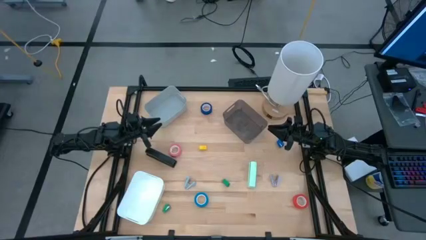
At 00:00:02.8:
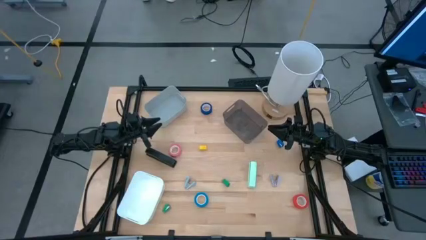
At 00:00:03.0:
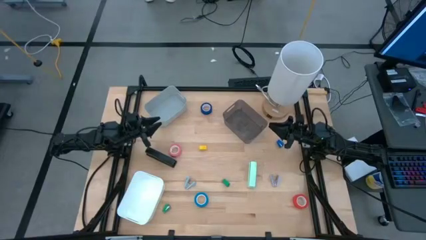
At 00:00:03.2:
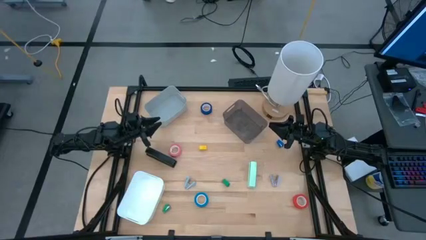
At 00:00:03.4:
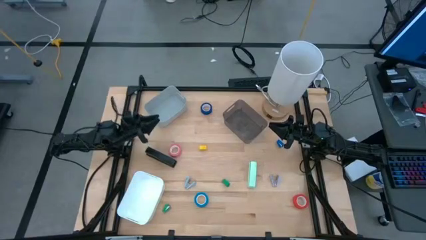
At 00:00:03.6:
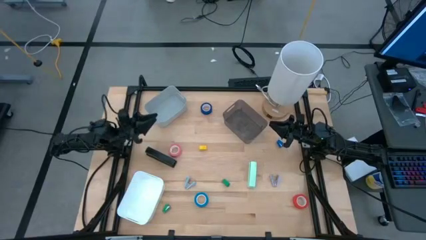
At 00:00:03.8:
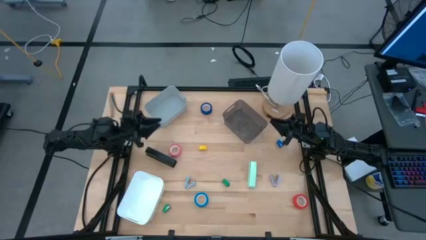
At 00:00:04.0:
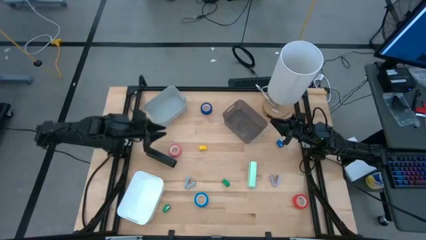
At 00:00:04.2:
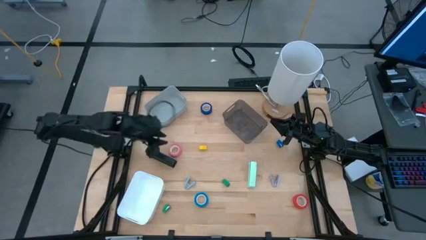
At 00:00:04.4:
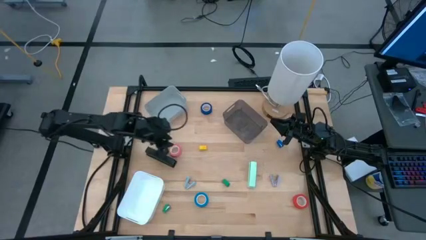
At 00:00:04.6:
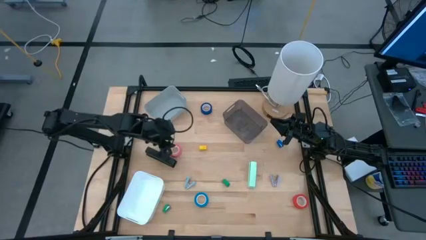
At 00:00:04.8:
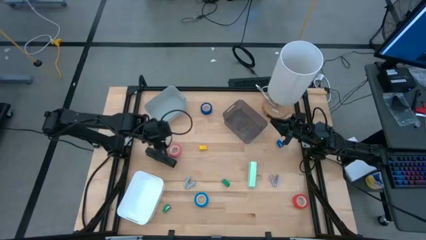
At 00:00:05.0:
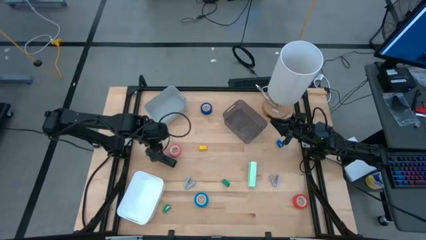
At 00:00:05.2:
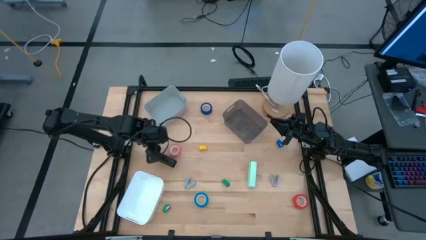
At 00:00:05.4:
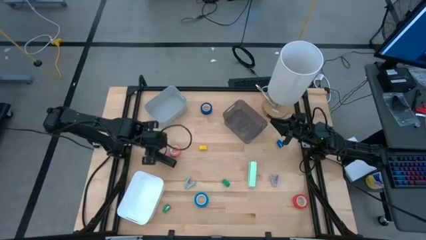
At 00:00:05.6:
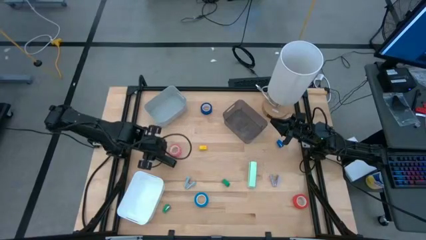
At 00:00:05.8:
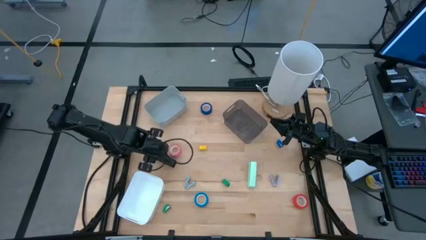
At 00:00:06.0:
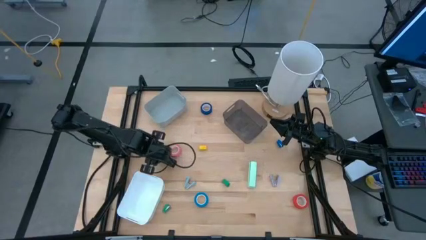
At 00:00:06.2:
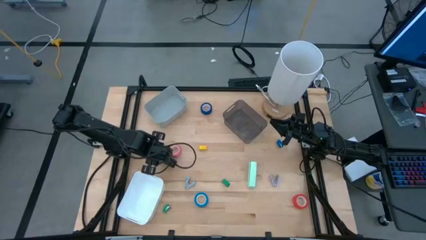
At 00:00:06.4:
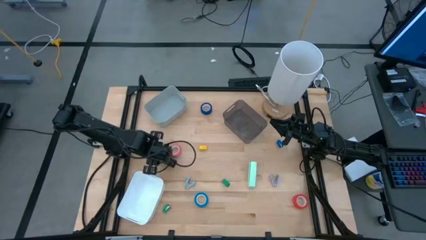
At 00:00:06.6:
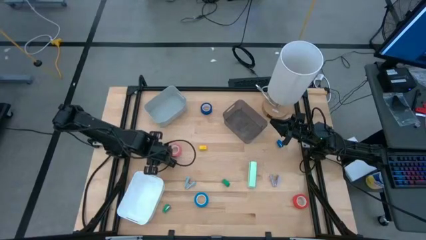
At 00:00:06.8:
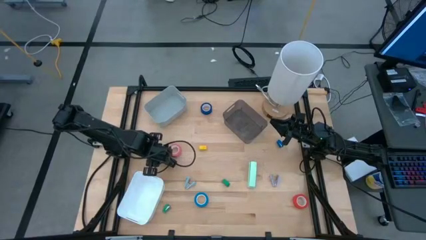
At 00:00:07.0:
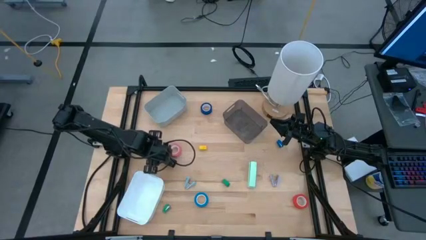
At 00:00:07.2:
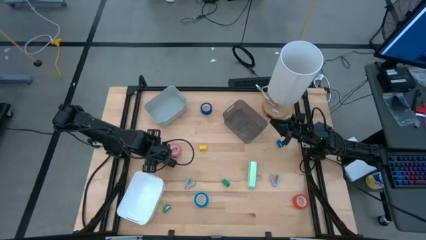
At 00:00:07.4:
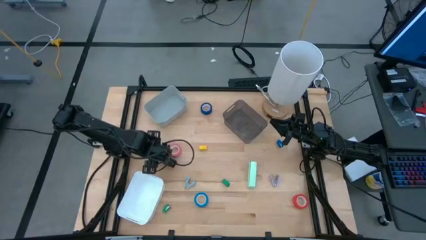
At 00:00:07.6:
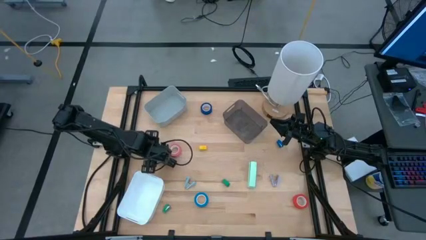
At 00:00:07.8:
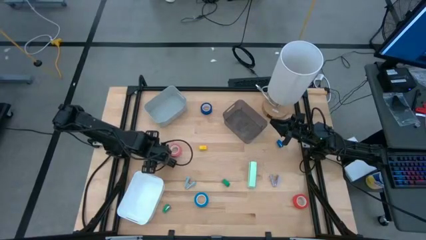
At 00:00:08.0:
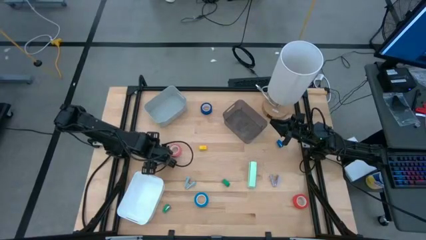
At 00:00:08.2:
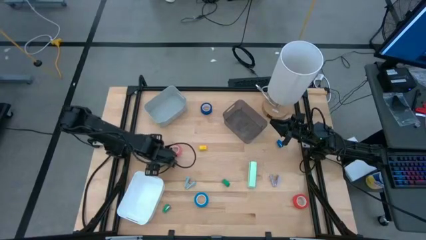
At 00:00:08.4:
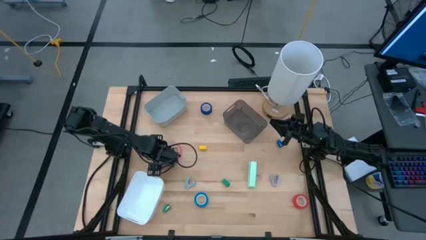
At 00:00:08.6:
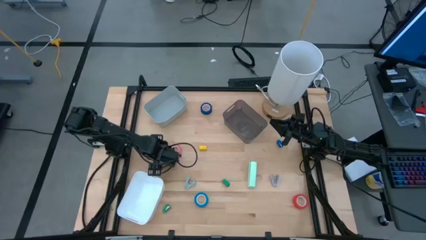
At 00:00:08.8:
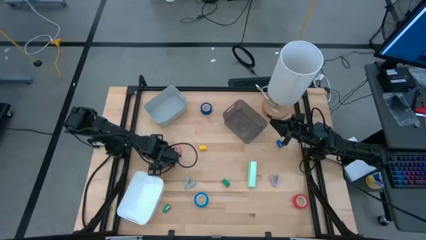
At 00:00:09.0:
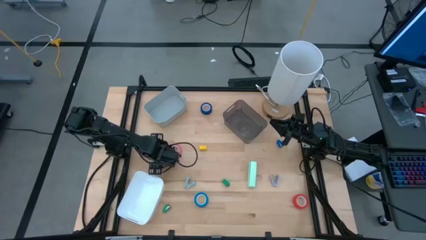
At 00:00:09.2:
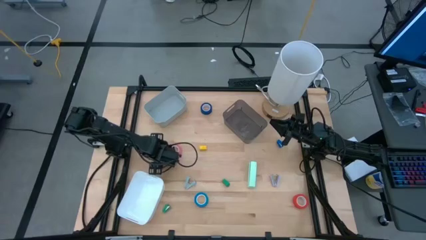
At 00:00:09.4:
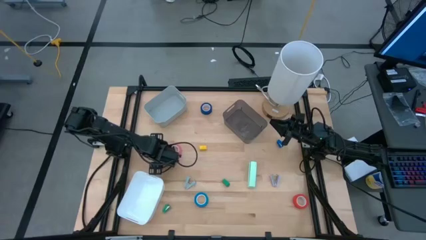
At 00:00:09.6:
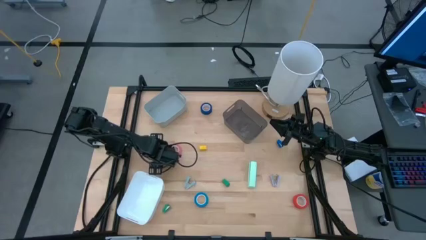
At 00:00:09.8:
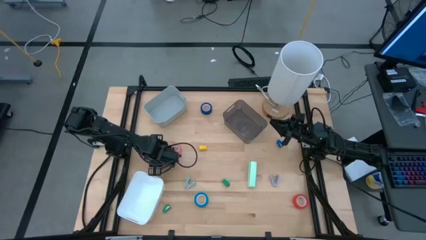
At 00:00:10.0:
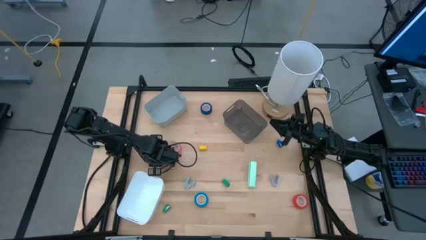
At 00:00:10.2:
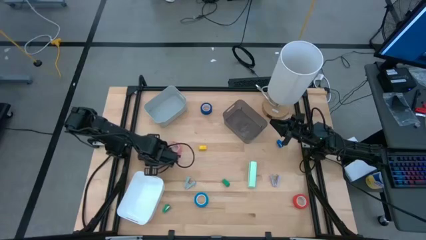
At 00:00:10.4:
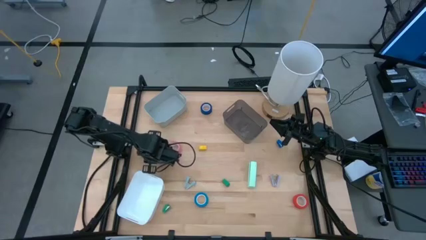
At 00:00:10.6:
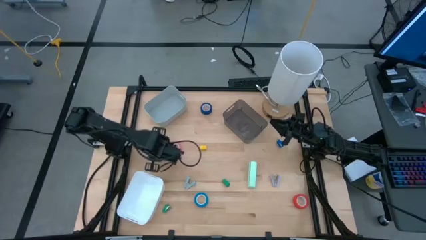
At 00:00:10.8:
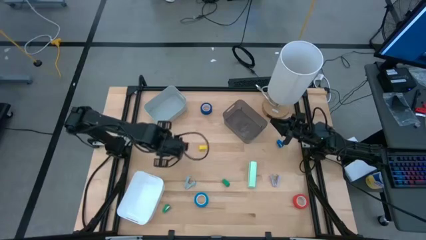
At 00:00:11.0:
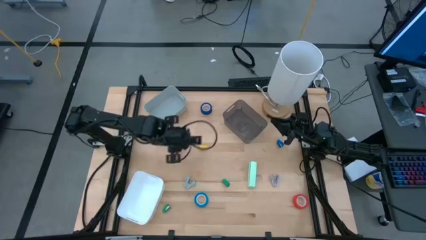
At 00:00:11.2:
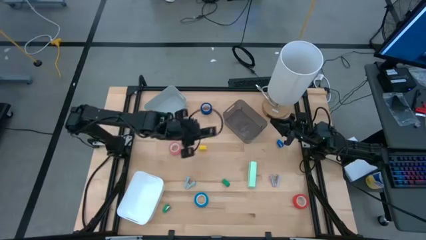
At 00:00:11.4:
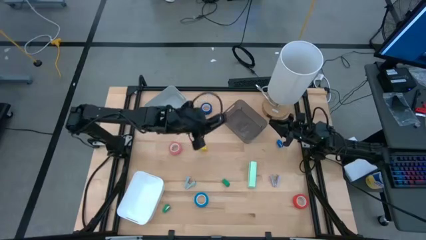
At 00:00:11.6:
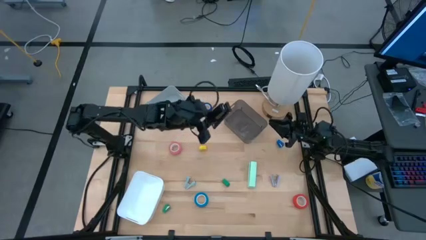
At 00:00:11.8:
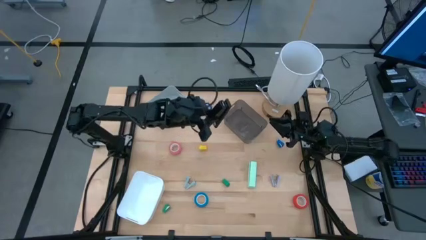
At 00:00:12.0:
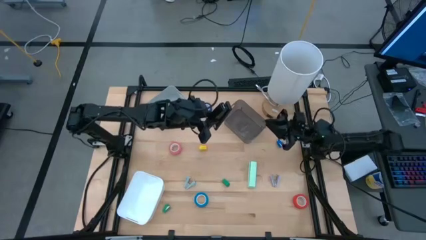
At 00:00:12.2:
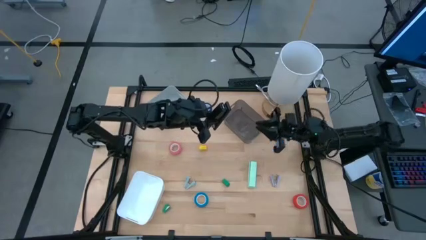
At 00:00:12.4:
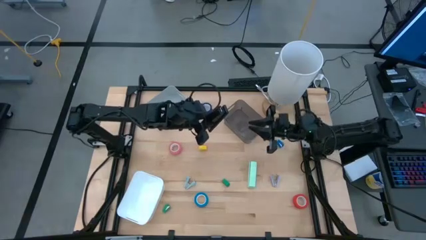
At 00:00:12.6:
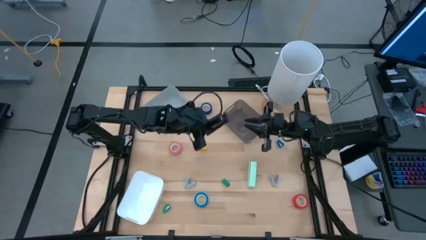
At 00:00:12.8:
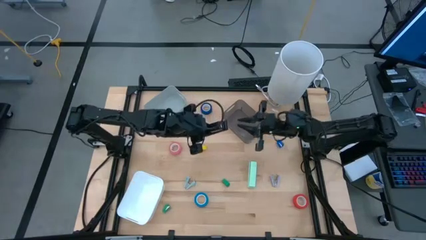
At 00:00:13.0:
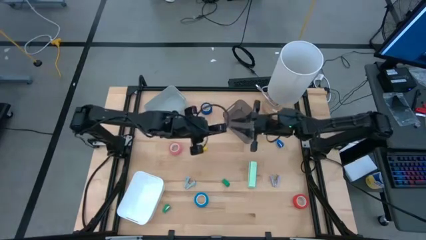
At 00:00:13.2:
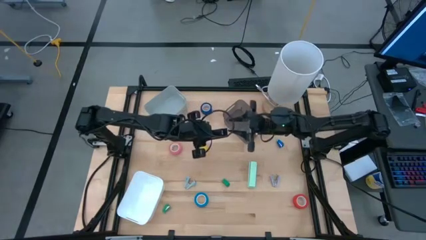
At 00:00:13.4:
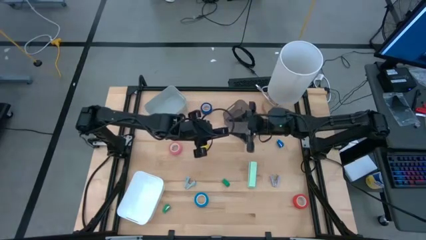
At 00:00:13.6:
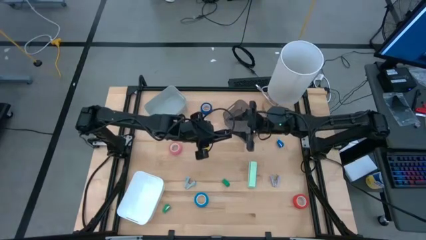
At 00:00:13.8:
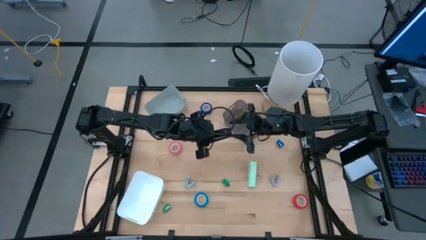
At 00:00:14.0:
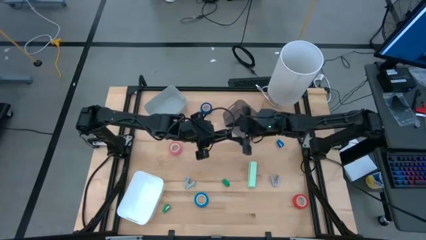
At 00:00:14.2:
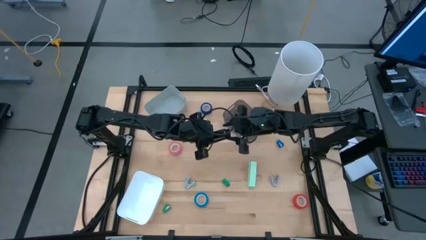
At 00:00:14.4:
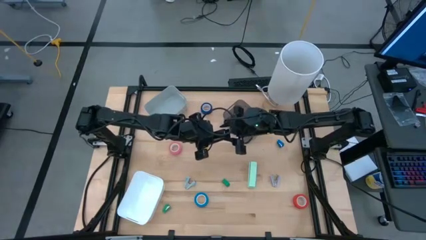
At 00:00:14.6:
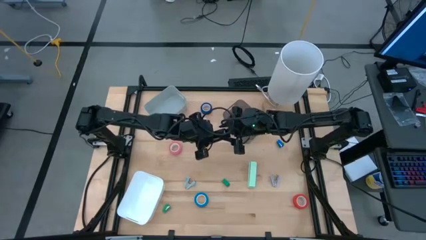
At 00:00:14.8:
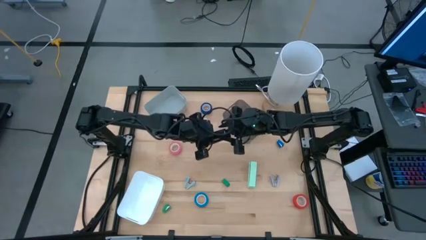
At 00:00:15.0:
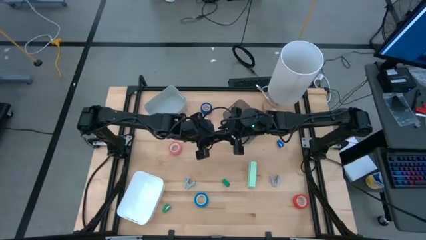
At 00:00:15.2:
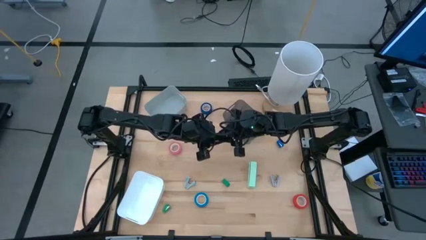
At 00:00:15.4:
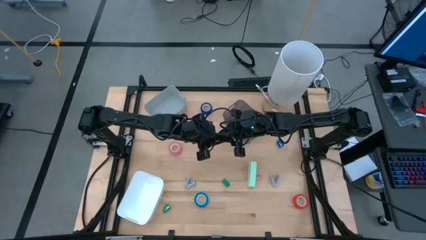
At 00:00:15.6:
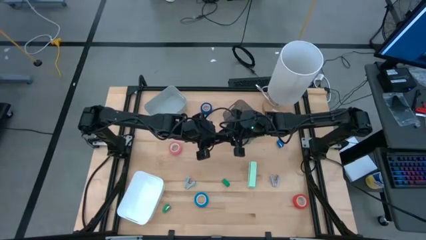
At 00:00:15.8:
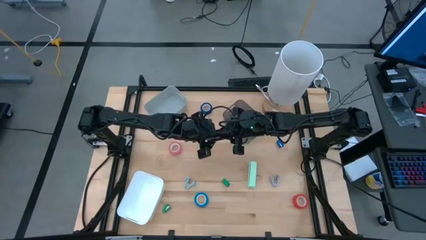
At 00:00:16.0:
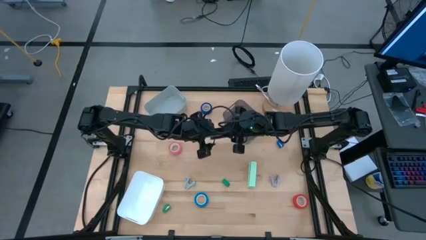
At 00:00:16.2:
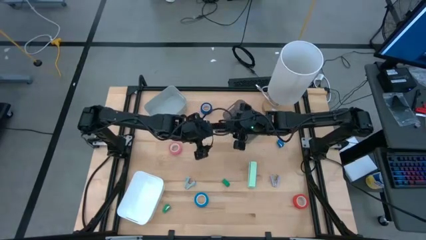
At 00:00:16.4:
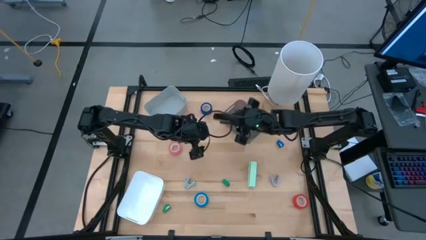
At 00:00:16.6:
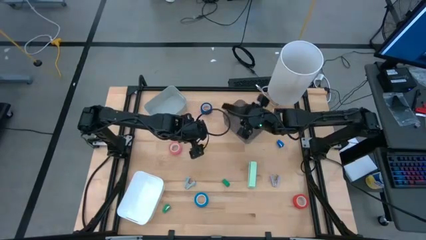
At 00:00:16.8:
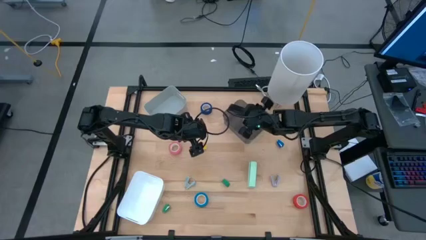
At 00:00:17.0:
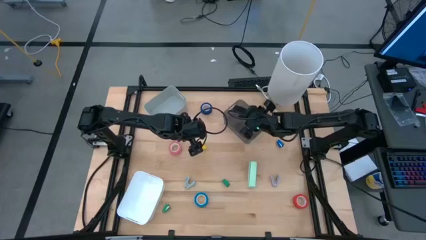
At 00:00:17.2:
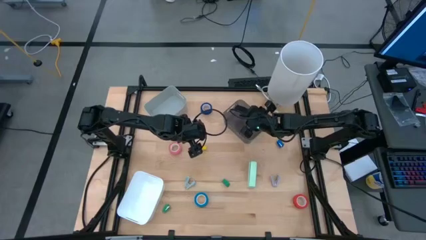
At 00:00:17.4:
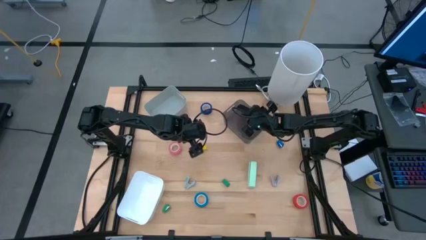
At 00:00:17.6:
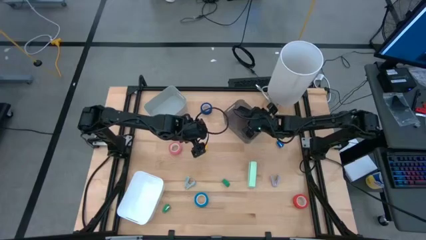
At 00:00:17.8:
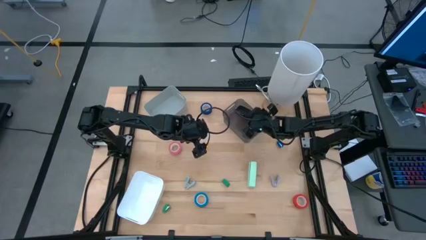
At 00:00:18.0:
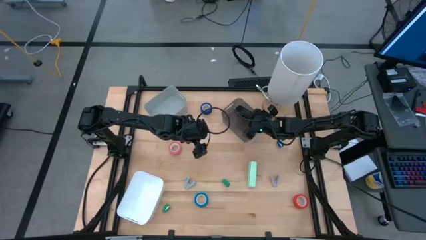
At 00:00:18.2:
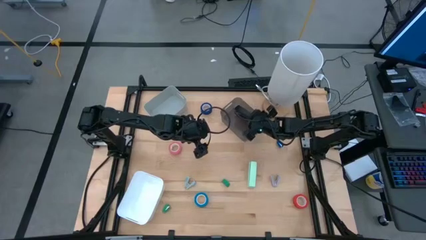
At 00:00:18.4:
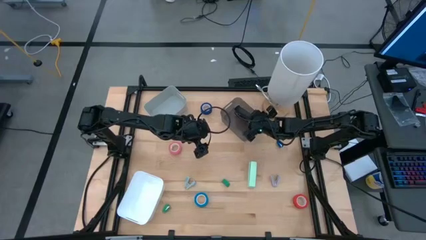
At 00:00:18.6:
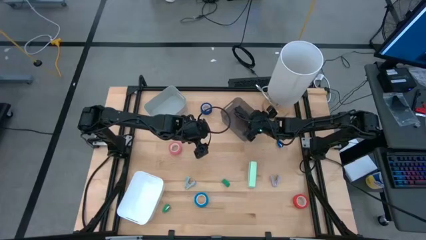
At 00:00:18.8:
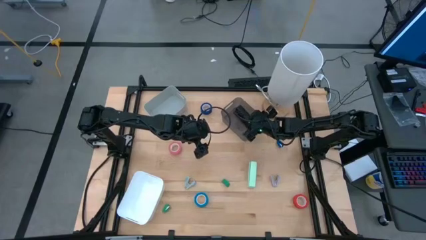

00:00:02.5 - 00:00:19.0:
Task: Pick and place Stapler, Stapler remover, tape
Put the black stapler into the black bin
